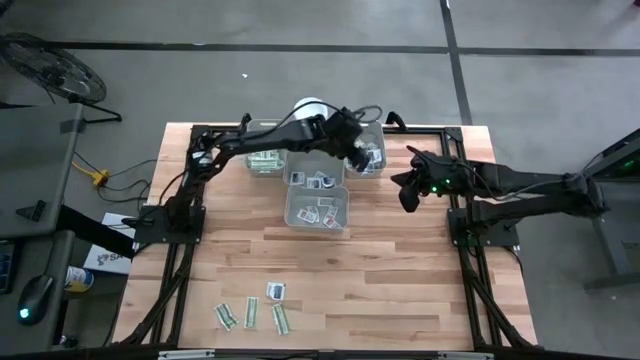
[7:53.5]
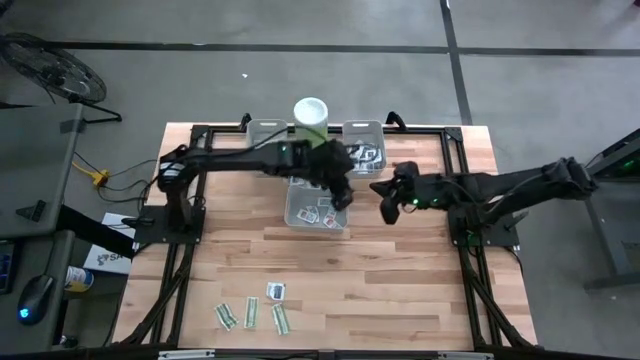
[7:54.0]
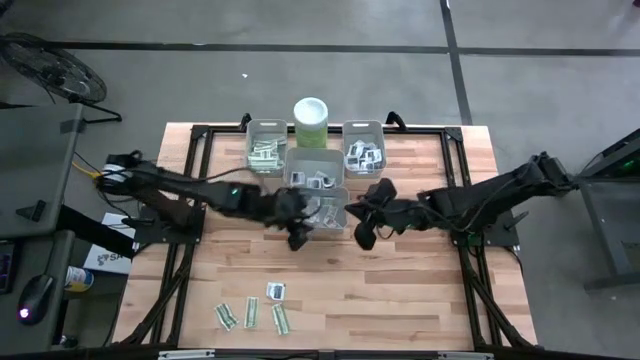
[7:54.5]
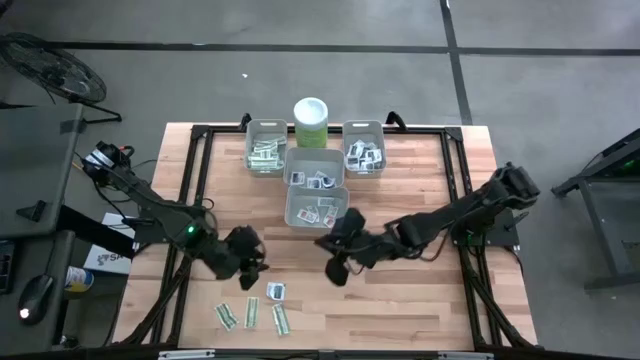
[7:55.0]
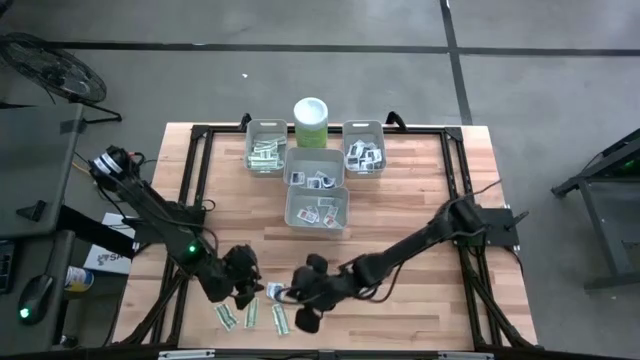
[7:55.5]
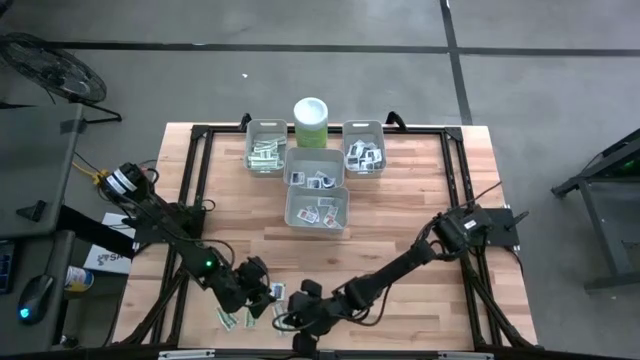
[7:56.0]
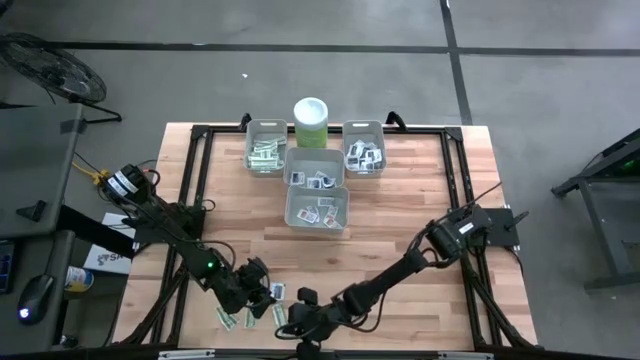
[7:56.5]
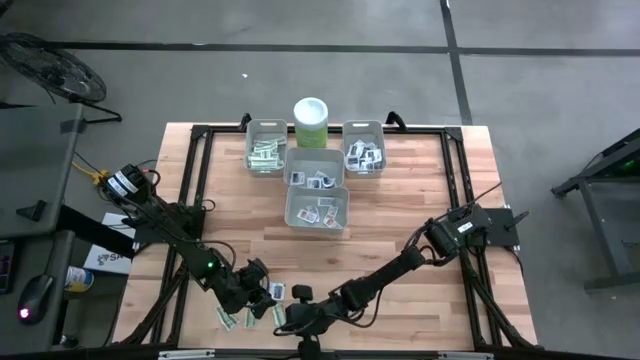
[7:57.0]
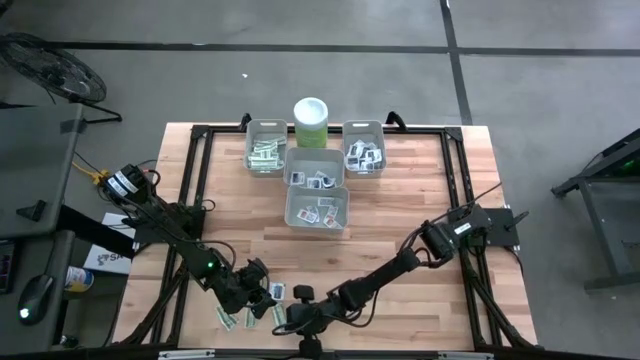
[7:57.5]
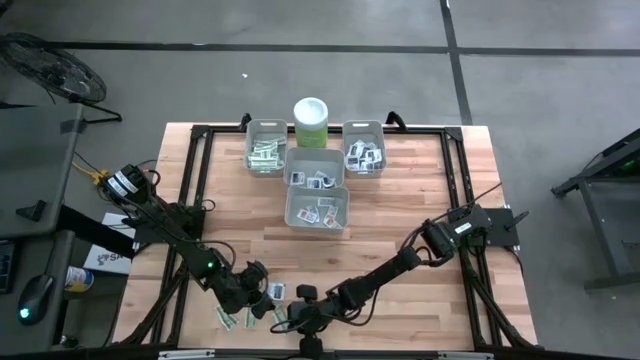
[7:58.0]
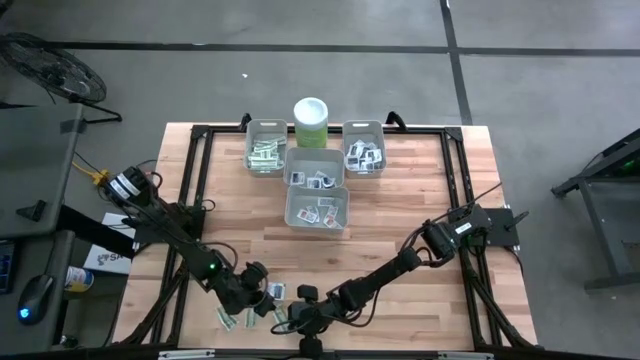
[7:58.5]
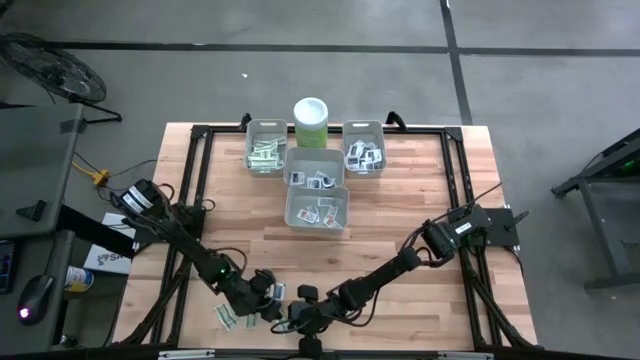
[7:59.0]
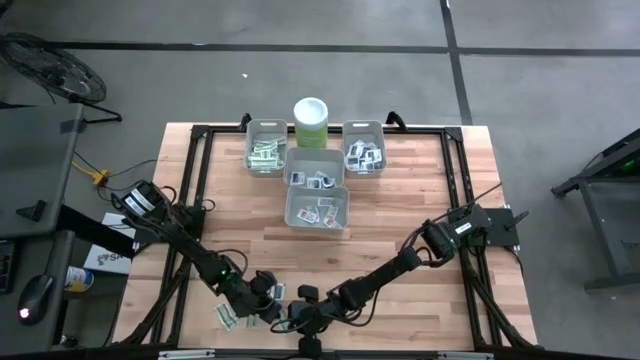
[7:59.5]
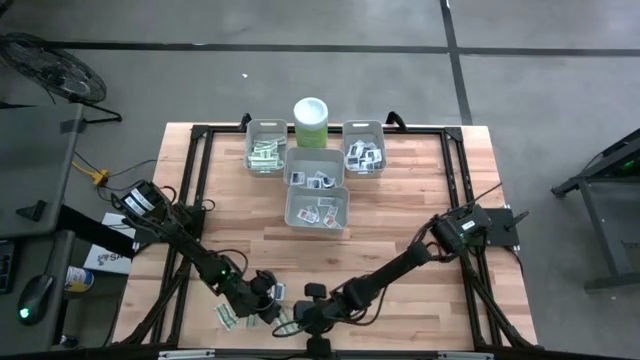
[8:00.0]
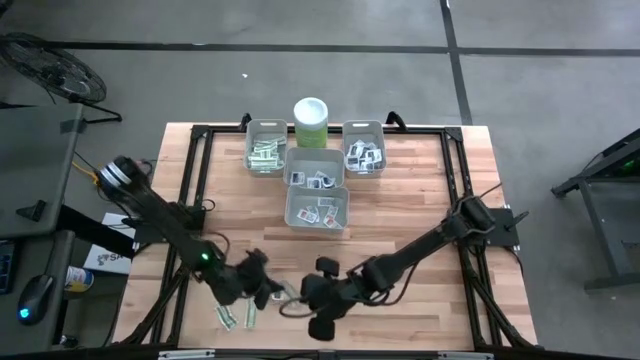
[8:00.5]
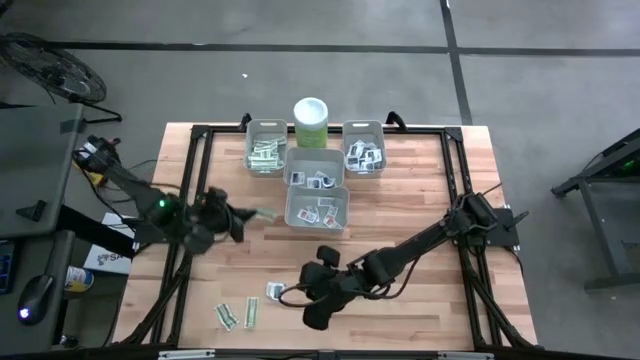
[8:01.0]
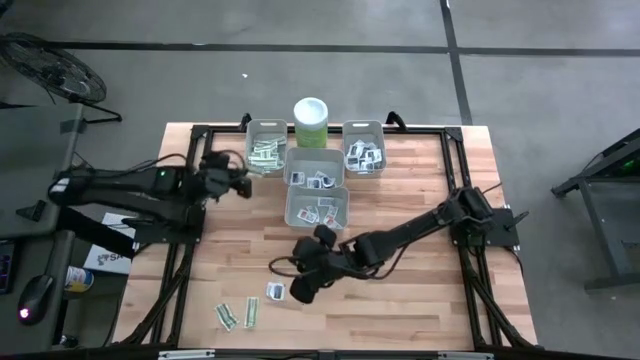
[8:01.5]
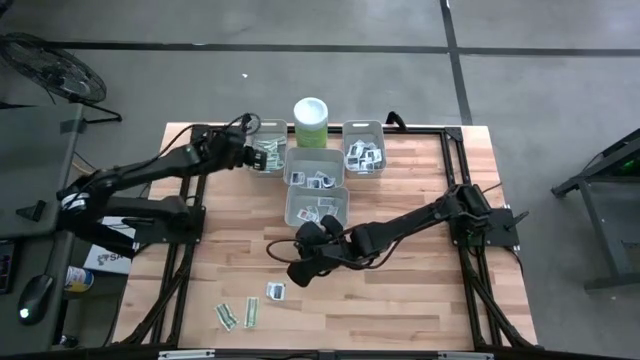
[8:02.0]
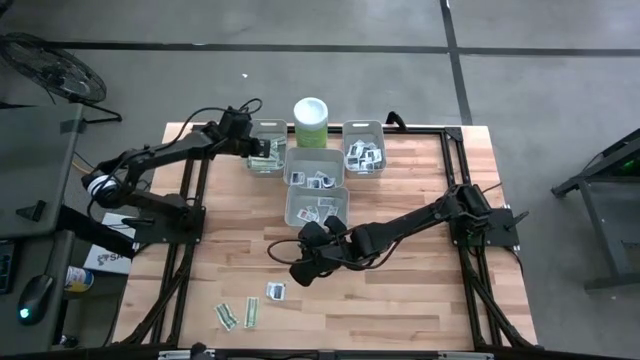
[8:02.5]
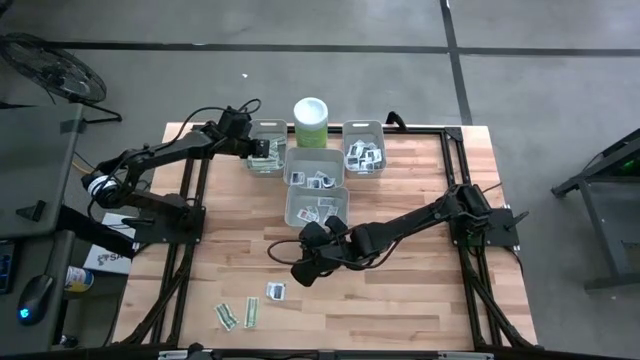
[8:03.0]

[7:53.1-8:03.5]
Task: Pick & Place First Aid Supplies
Put the right bandage pack into the left bin

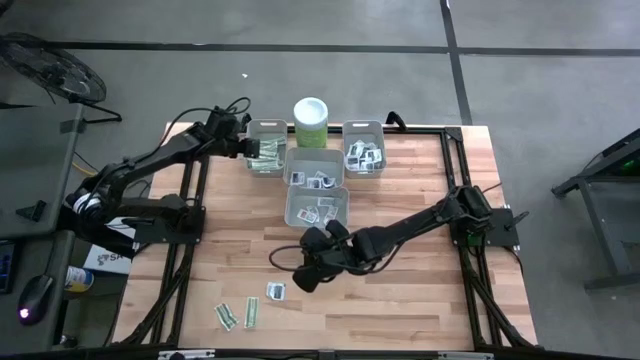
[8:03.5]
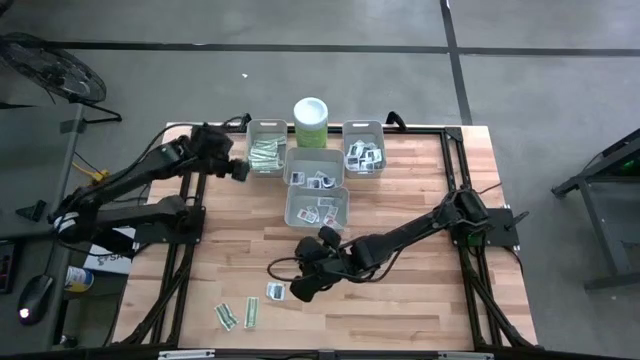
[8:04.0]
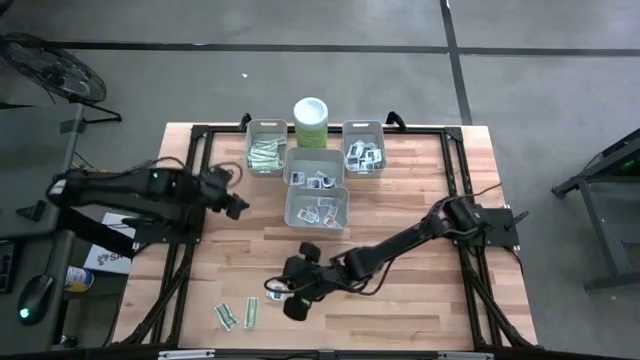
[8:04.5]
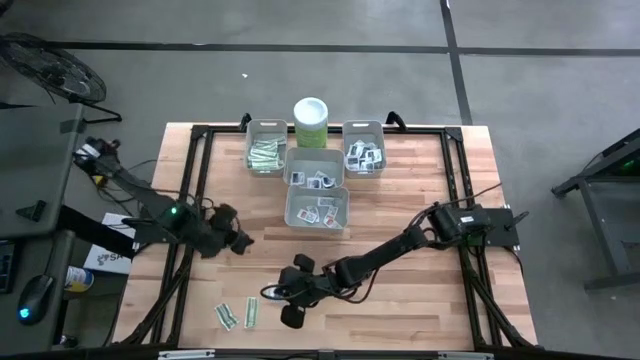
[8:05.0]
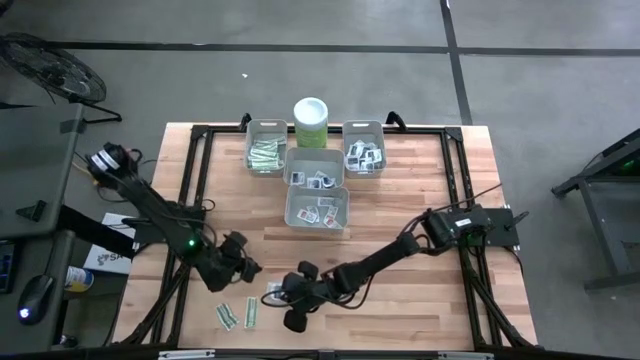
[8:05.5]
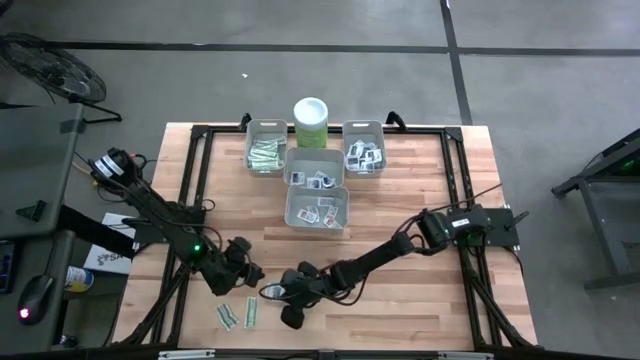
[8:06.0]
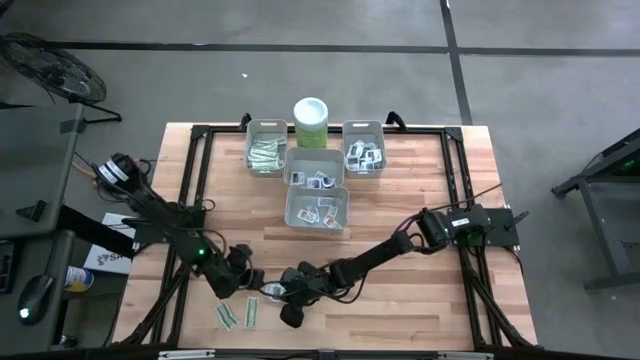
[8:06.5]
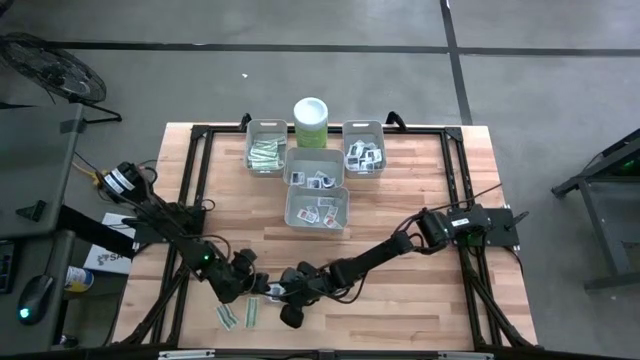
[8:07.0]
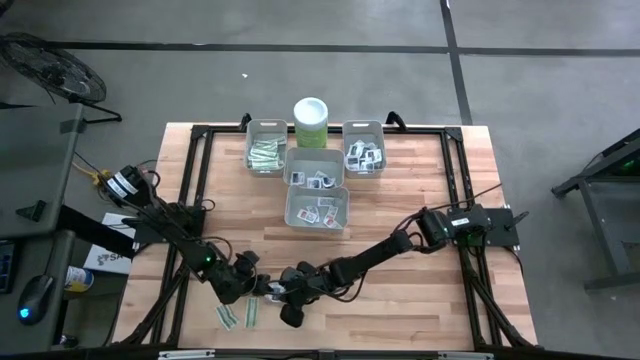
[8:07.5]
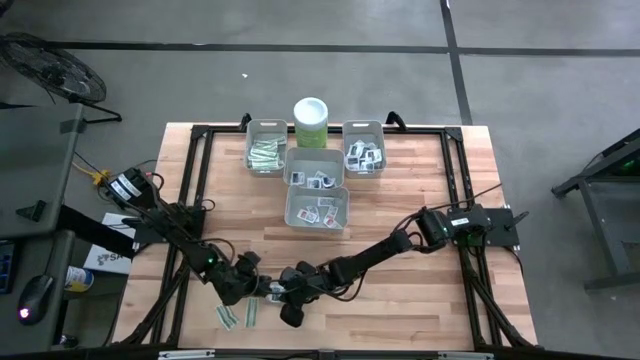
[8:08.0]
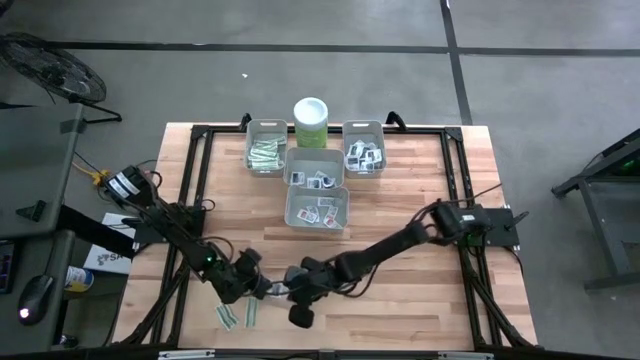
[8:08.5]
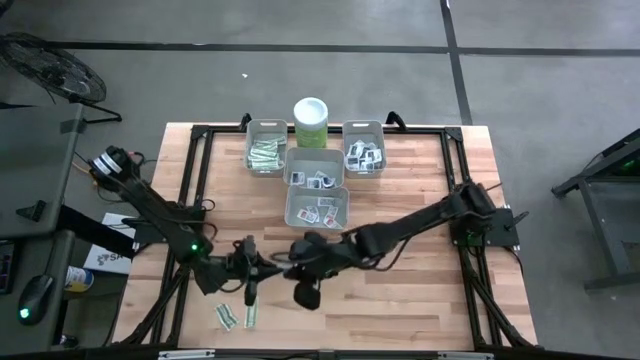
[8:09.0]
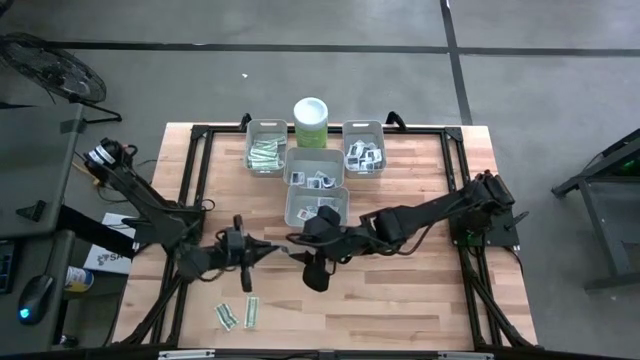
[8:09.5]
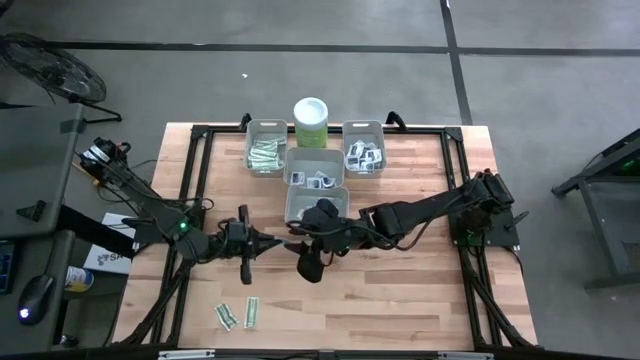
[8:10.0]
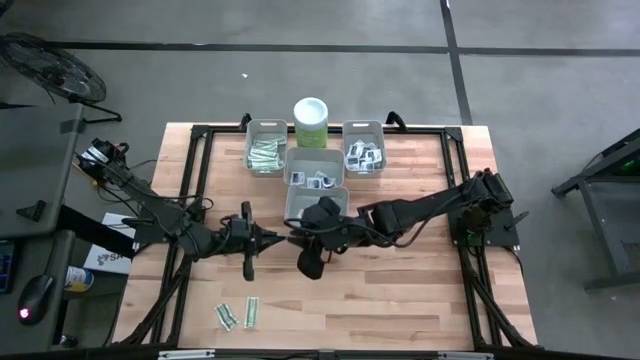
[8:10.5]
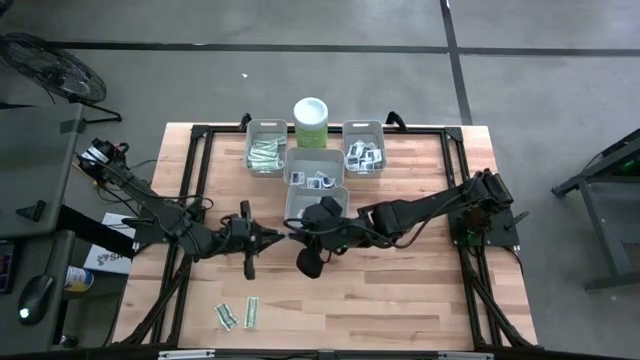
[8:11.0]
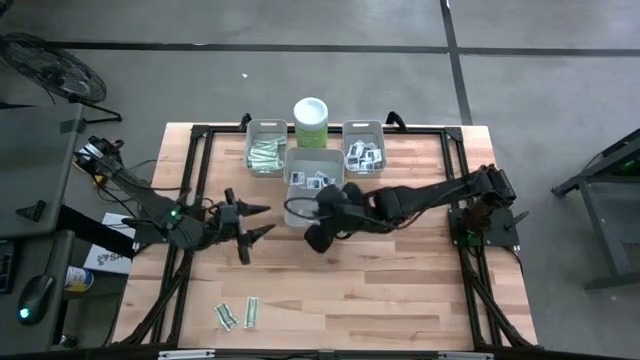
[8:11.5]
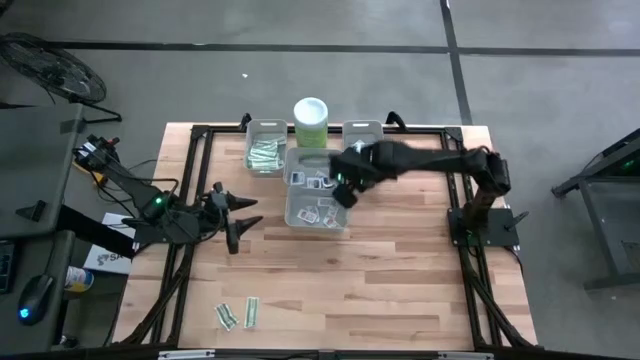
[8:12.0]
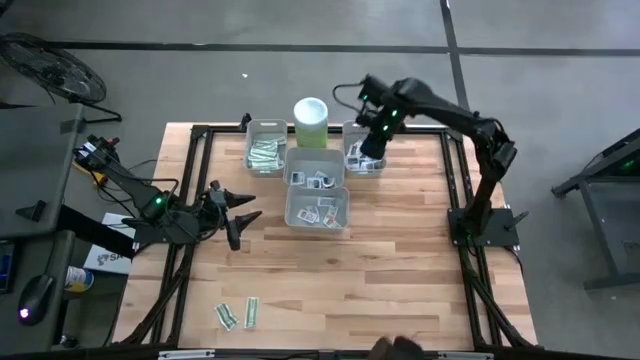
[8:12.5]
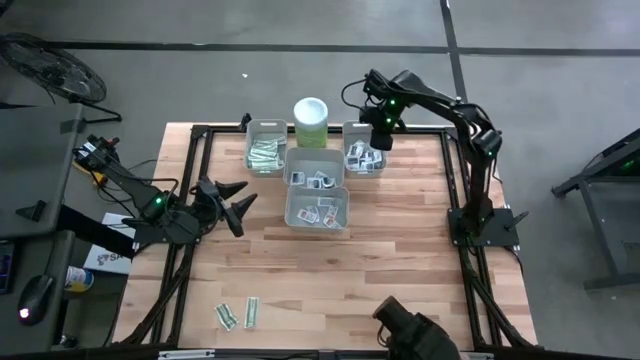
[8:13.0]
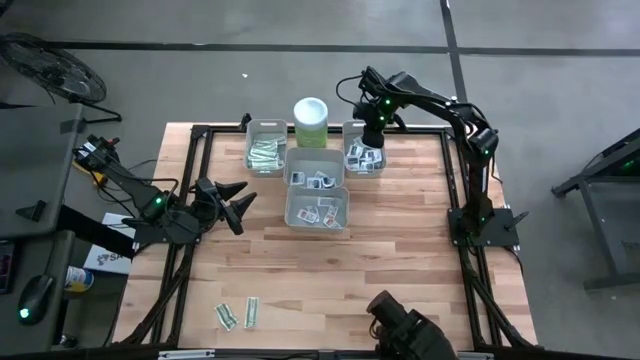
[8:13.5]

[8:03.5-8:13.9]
Put the towelette pack into the right bin

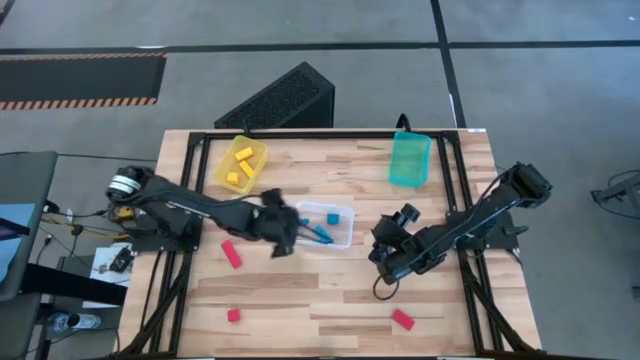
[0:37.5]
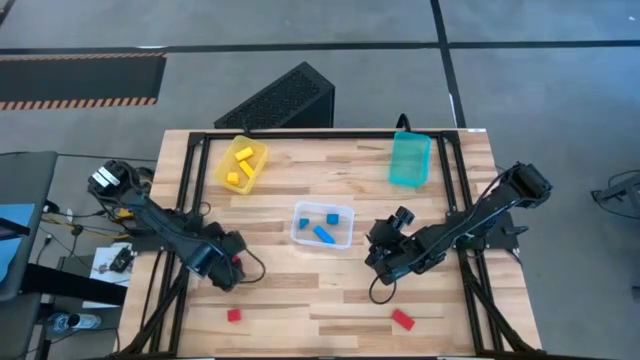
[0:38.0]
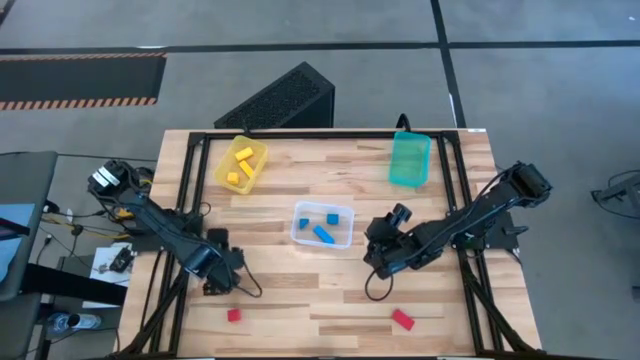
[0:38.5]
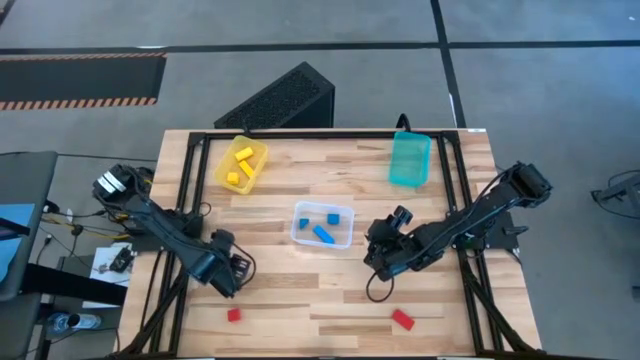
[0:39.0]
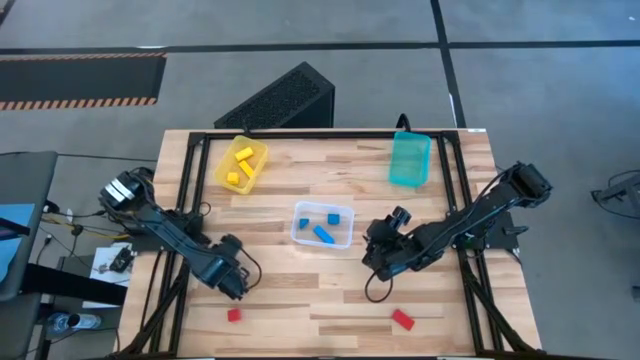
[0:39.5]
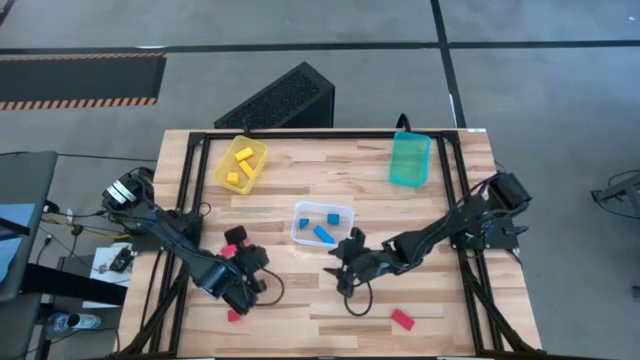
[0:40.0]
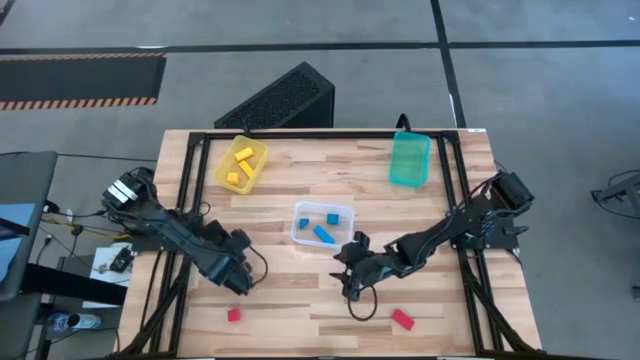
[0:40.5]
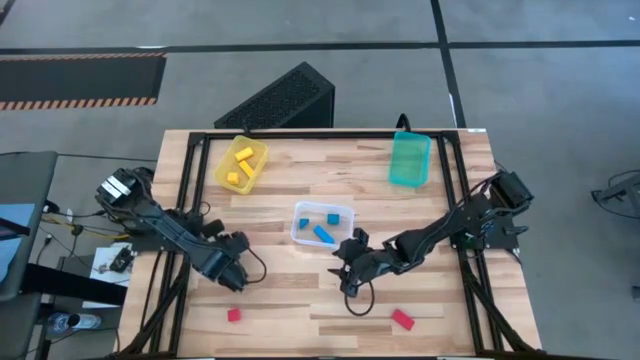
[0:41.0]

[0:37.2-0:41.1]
Task: Sort & place blocks by color
Put the top red block into the green bin
